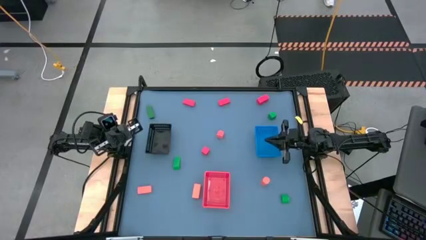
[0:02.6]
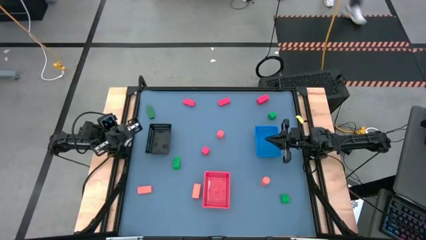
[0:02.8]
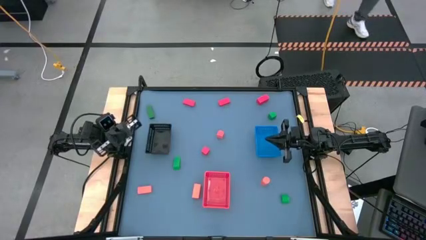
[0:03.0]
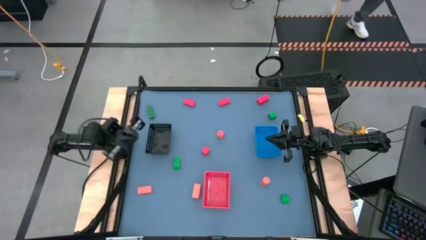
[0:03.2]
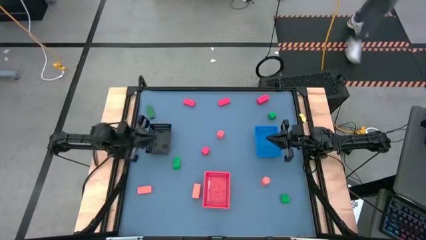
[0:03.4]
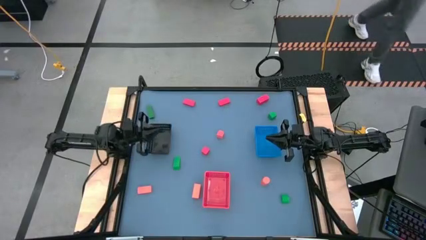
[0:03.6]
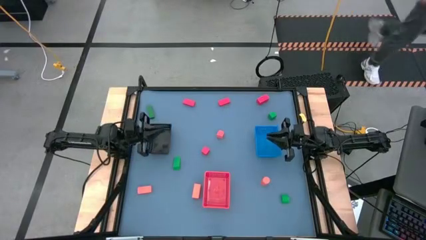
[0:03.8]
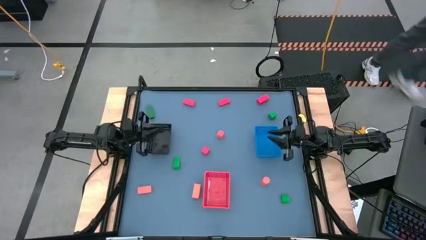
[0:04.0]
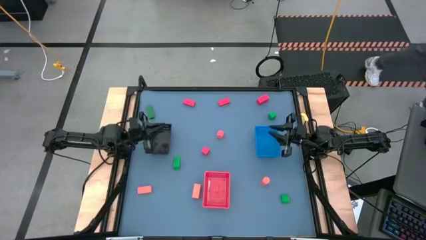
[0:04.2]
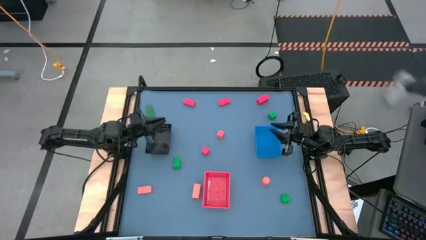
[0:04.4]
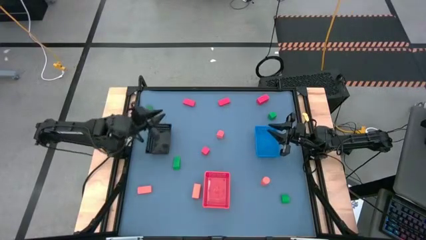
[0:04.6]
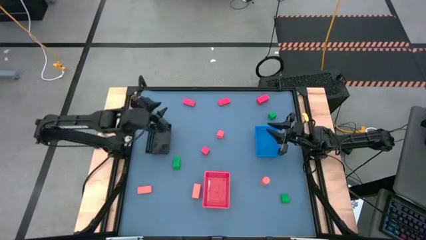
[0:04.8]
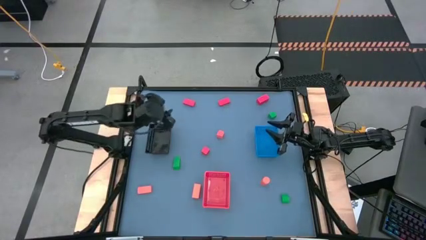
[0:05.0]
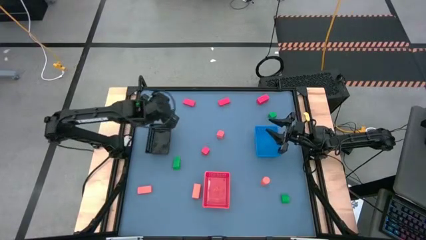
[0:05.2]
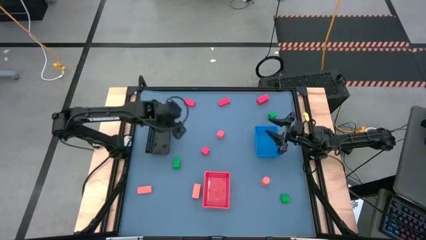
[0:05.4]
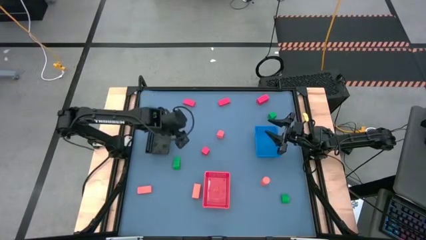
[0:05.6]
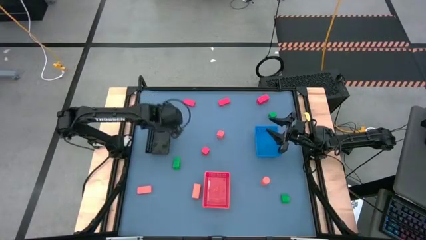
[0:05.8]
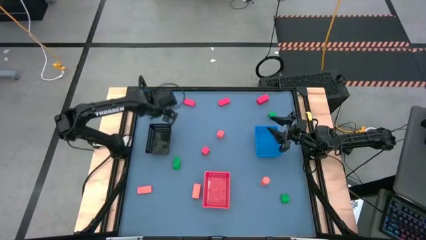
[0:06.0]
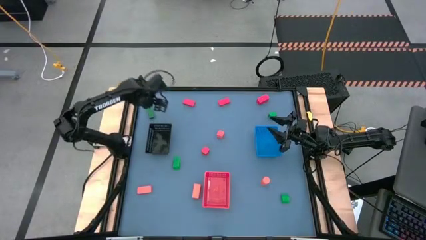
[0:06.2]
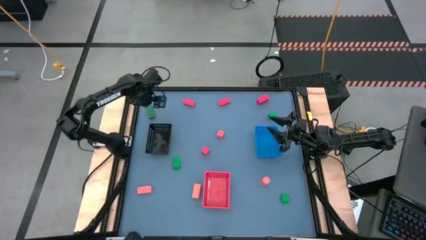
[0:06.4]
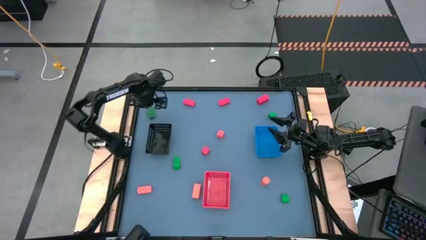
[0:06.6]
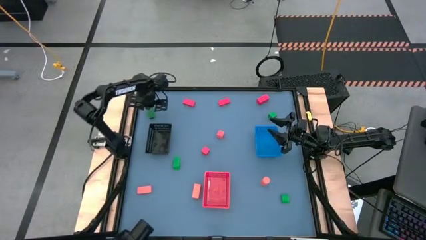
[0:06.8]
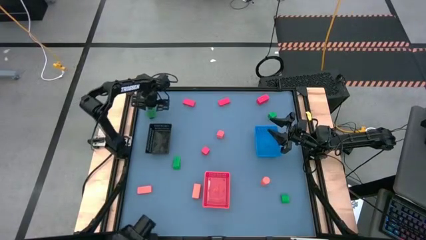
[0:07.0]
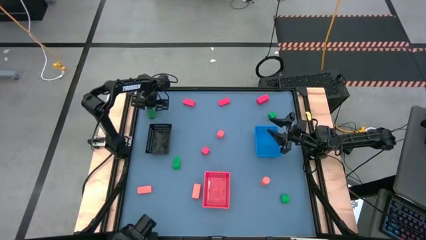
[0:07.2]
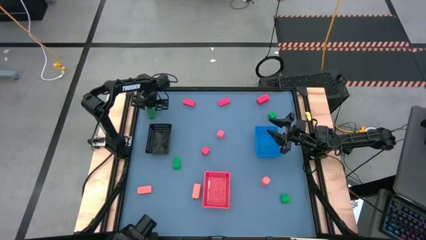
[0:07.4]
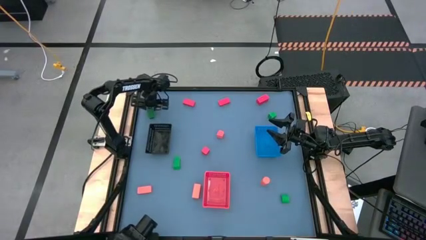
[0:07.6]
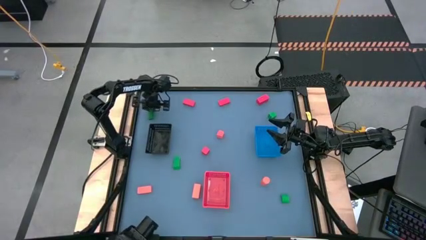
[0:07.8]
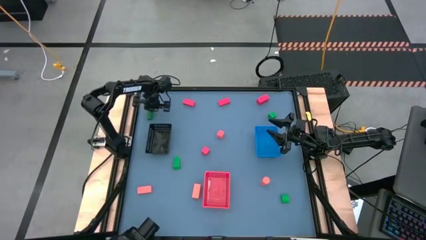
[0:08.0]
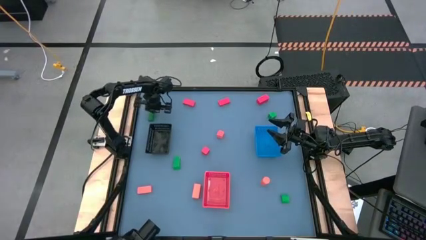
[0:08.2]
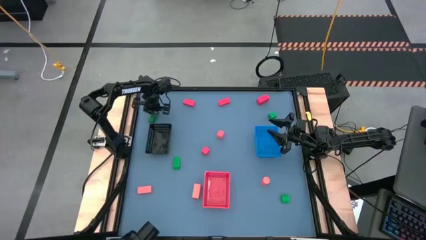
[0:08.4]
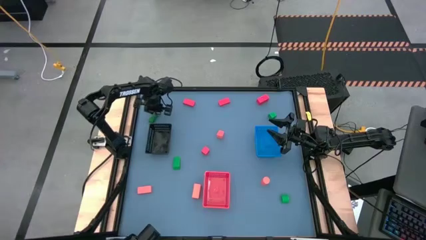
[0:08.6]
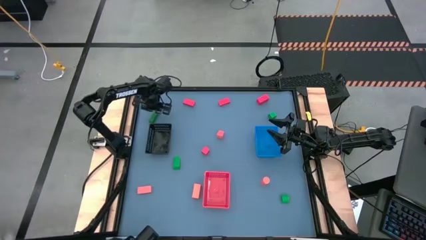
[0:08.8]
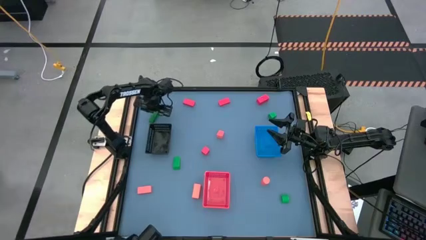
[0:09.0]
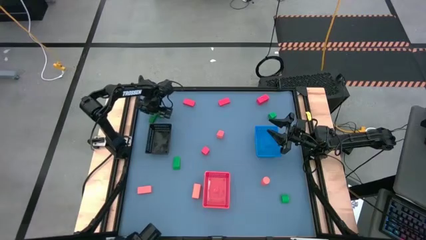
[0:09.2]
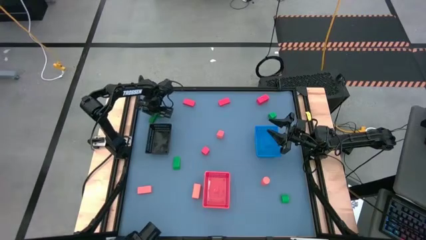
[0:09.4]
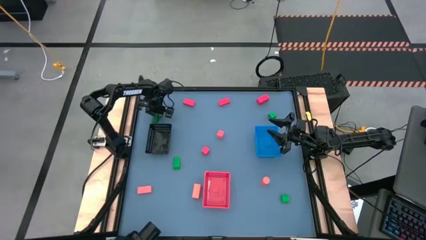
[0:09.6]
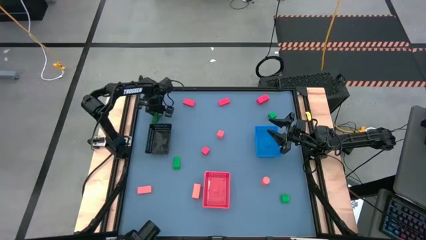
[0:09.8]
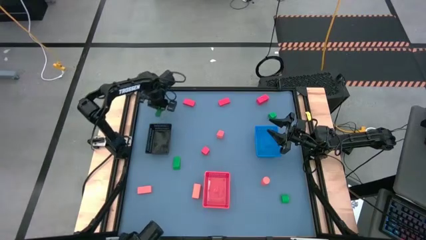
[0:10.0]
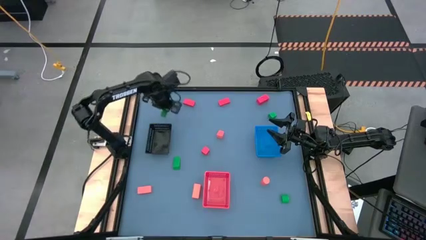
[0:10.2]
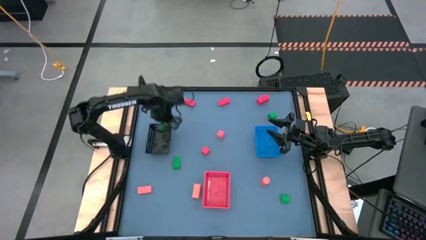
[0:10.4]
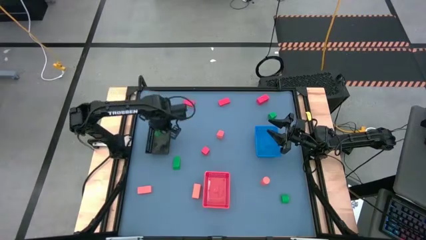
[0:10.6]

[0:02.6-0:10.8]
Task: Sort & place blocks by color
Put the green block into the black bin

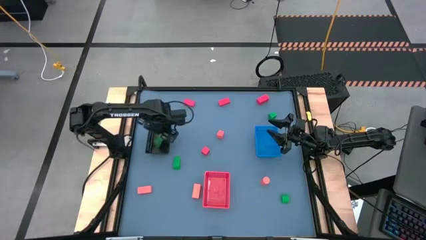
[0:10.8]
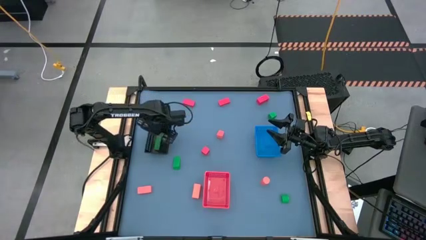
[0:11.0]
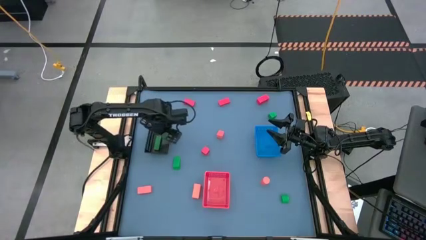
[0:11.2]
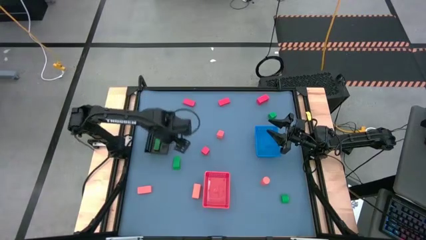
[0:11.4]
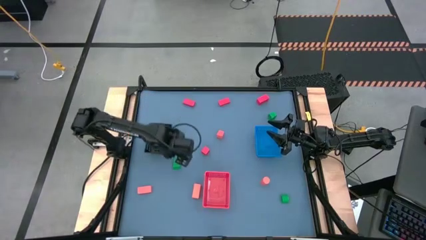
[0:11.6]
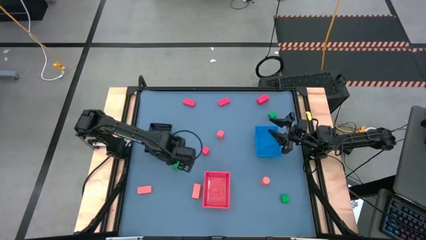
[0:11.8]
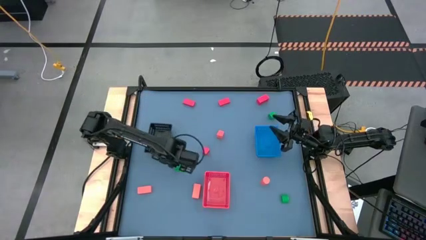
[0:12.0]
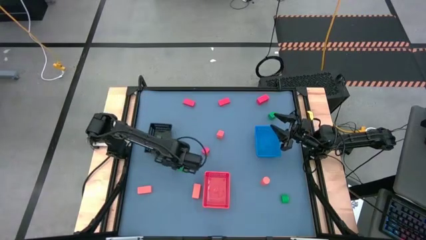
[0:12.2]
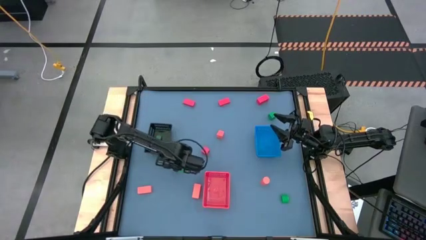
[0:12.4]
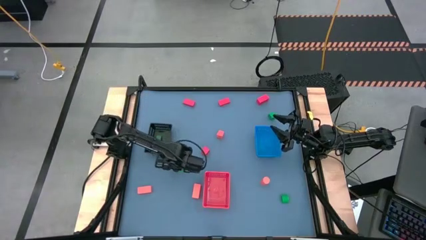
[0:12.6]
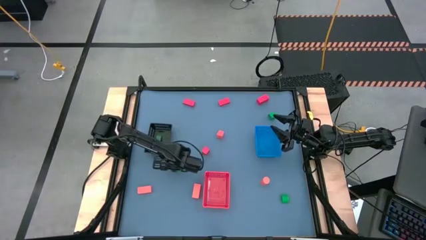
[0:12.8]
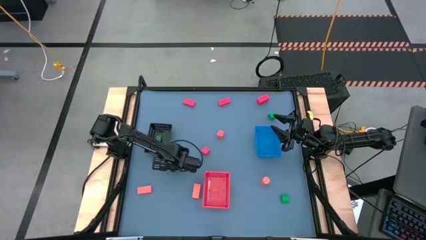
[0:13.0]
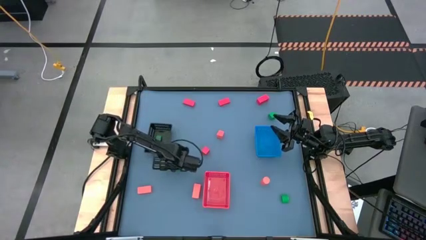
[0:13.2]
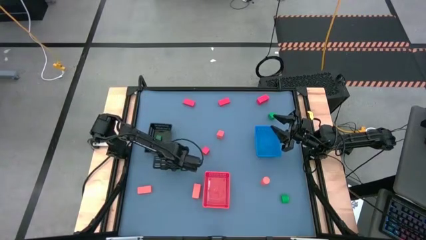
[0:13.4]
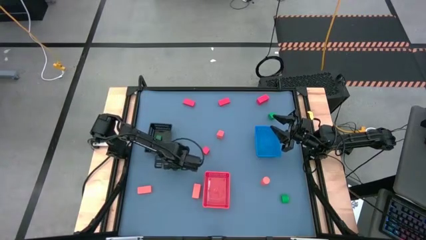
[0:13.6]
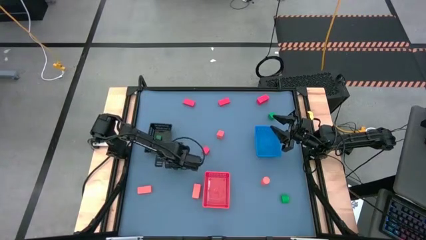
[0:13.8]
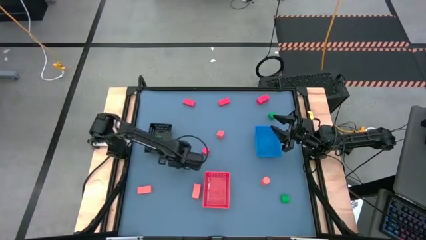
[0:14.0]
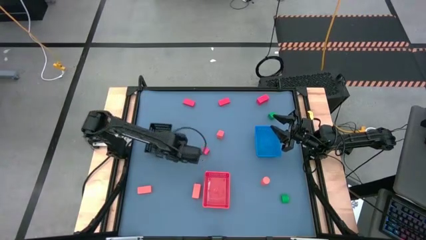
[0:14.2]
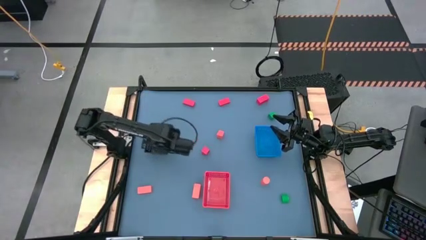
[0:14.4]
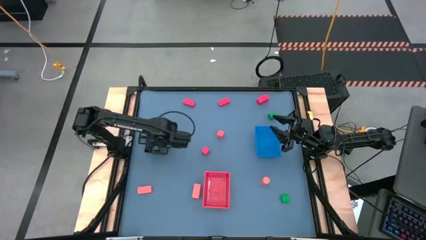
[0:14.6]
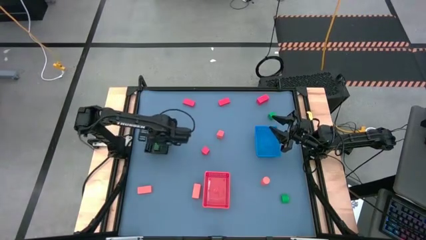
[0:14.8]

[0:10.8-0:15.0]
Put the green block into the black bin

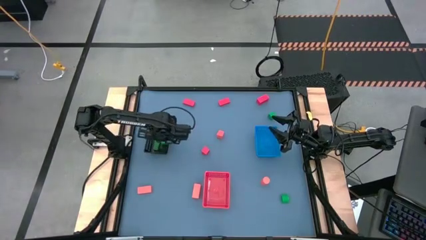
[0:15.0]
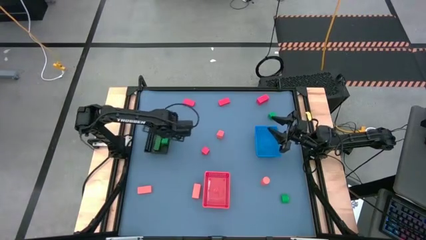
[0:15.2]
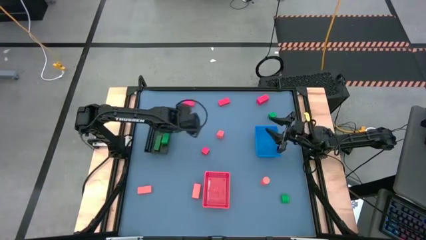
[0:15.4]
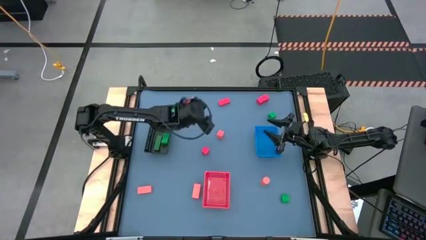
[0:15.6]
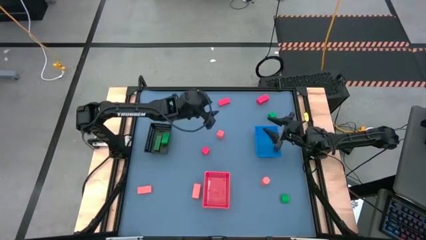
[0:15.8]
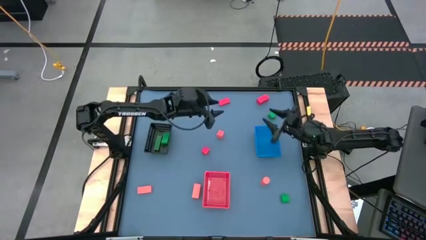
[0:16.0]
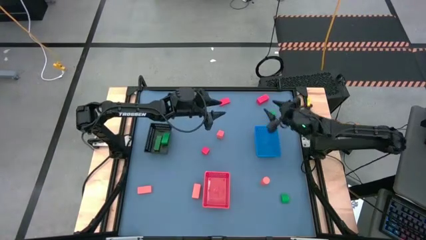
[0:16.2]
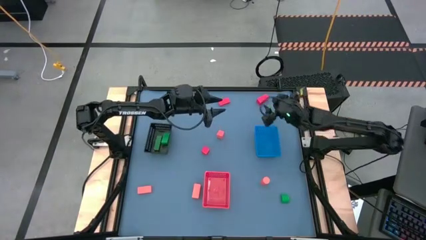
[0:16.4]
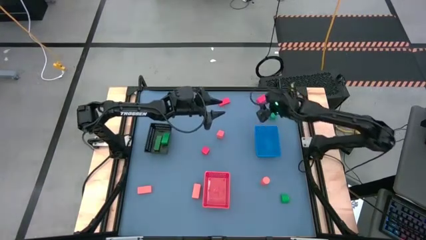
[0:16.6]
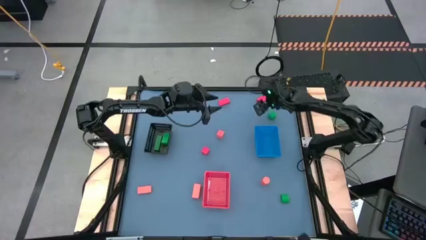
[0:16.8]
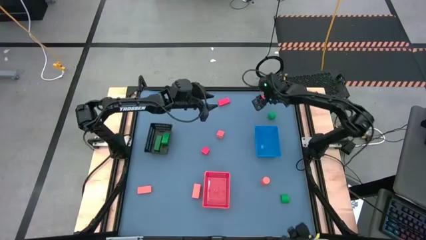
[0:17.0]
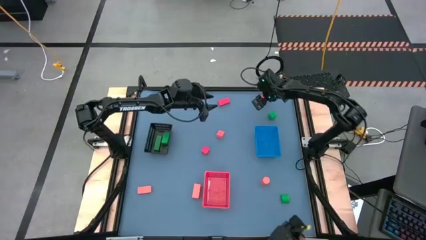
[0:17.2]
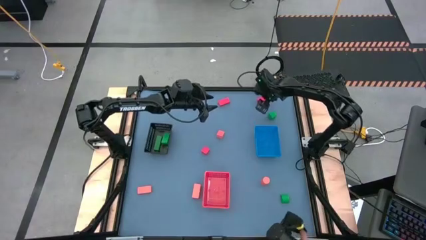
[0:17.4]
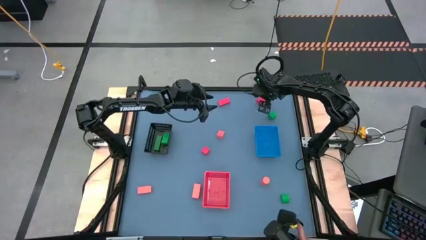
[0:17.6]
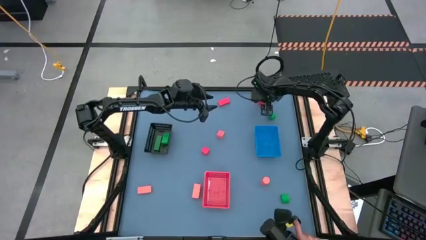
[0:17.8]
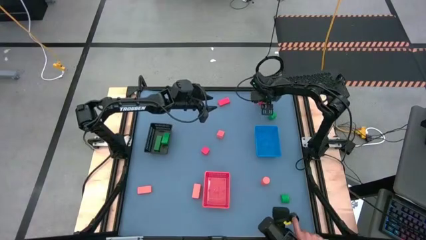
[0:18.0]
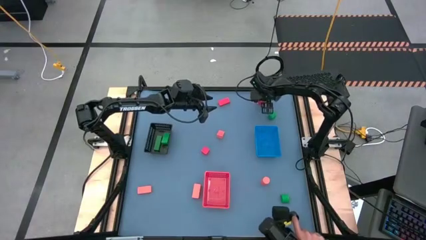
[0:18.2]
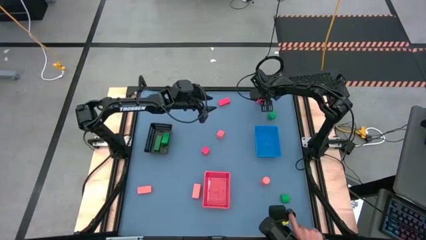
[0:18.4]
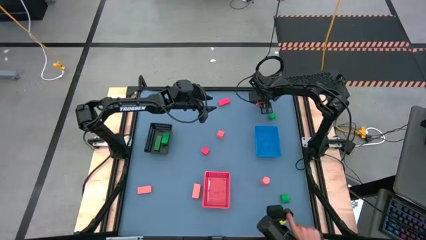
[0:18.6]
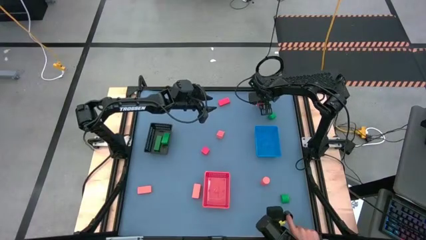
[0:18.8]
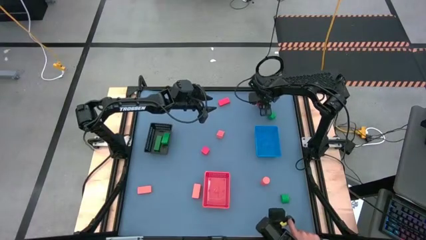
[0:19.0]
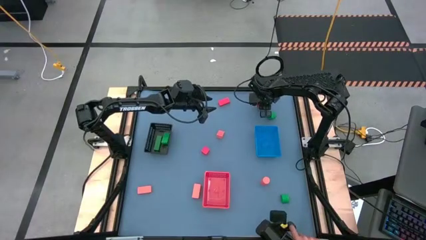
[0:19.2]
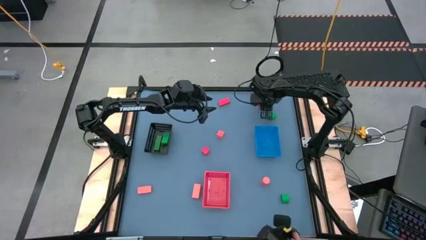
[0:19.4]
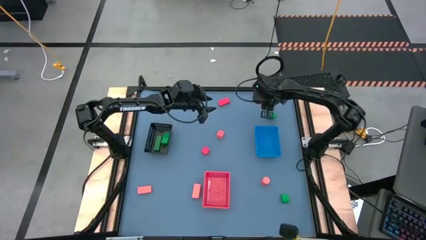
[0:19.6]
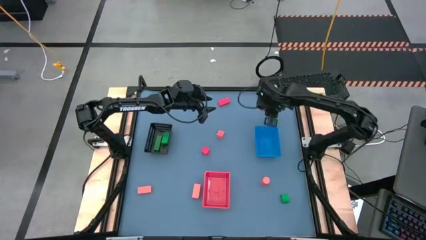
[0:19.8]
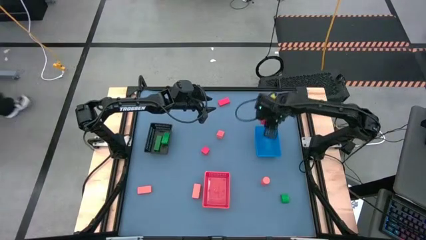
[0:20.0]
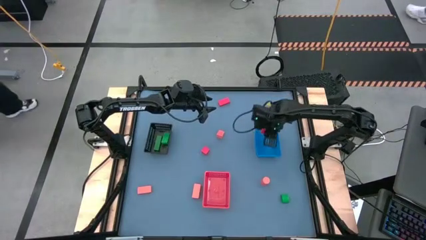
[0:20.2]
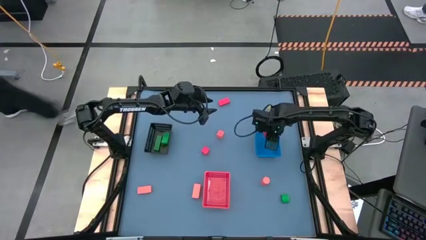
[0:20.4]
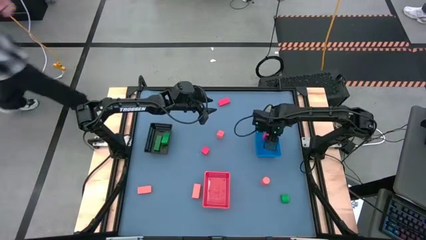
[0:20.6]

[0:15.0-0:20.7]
Put the red block into the blue bin
